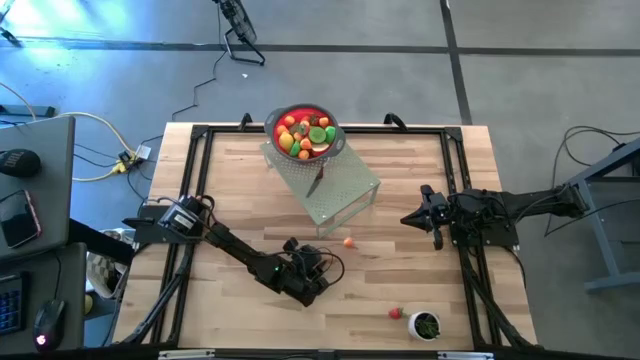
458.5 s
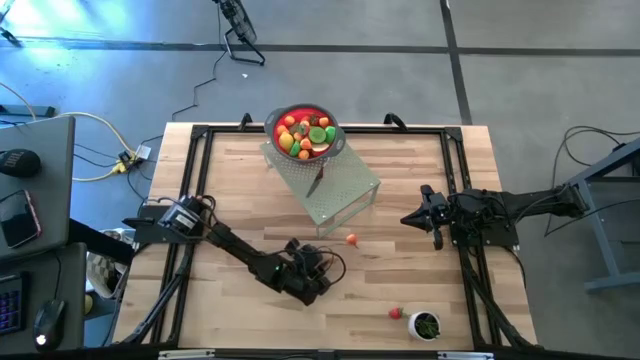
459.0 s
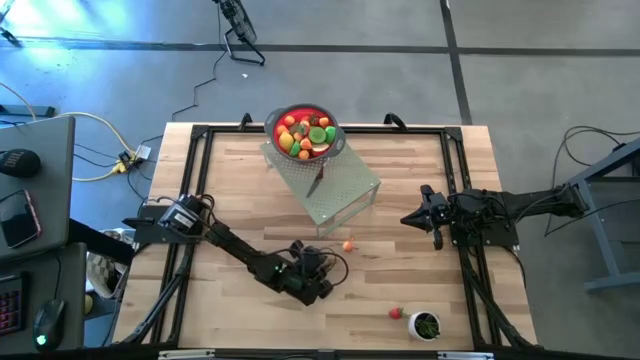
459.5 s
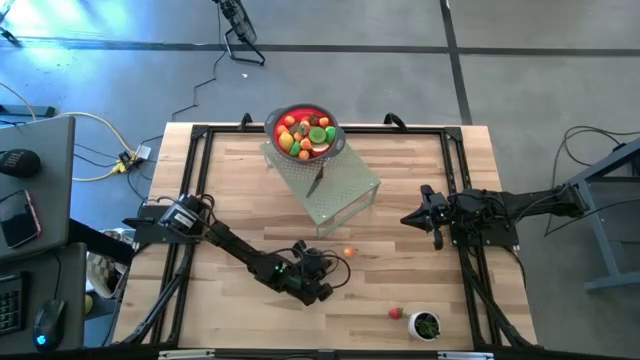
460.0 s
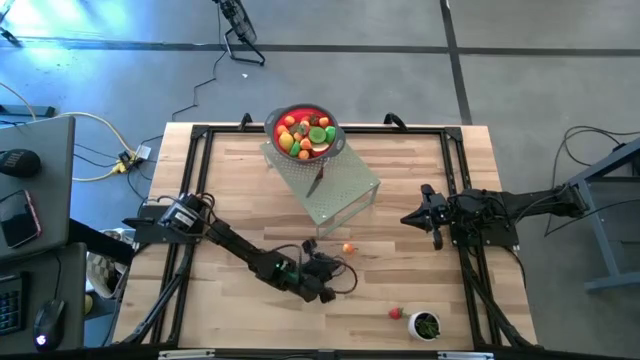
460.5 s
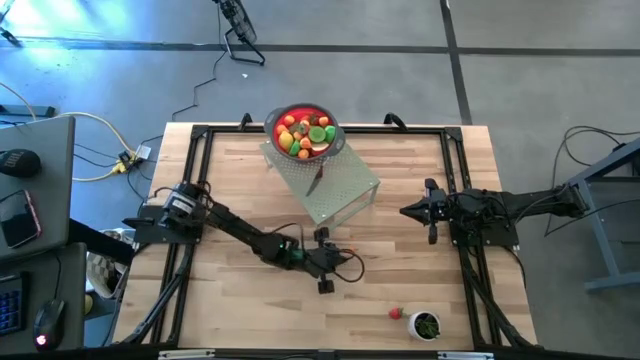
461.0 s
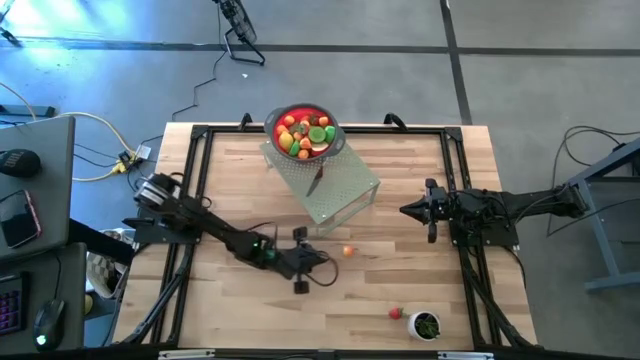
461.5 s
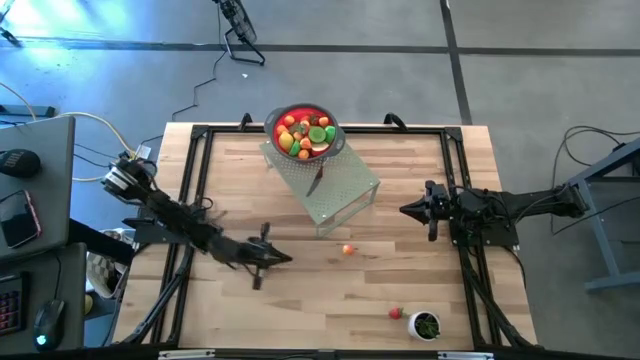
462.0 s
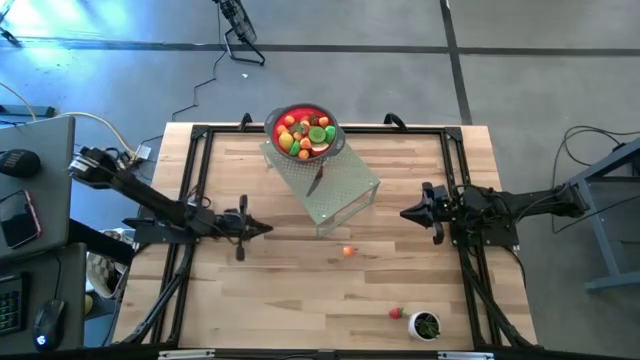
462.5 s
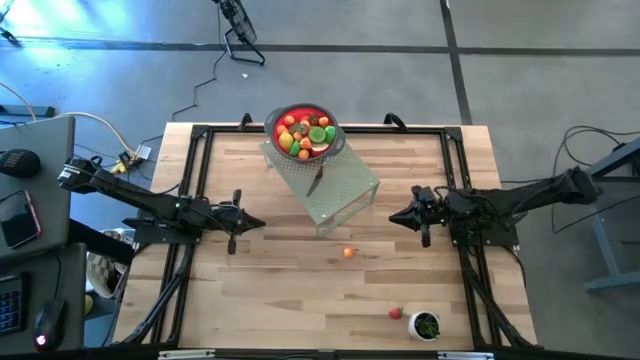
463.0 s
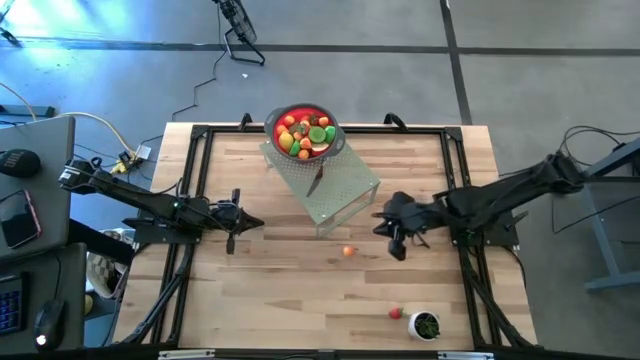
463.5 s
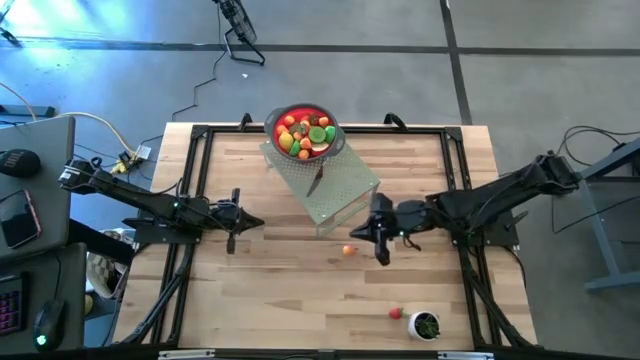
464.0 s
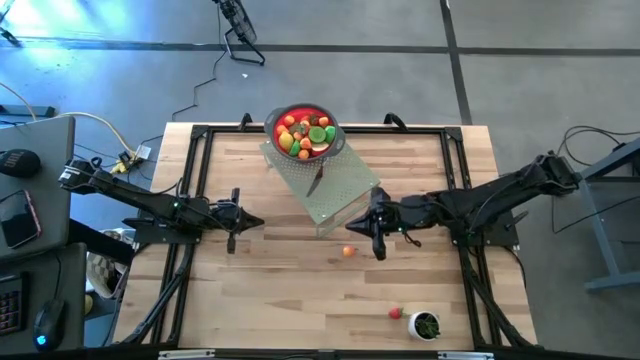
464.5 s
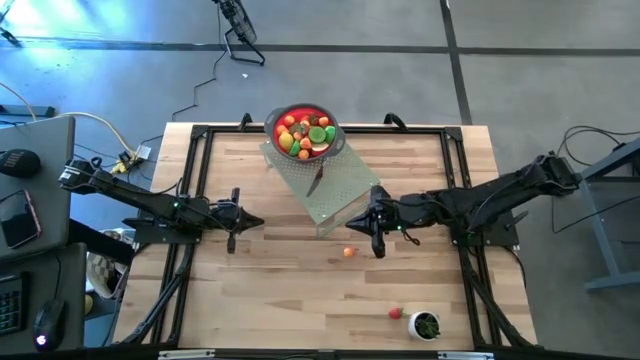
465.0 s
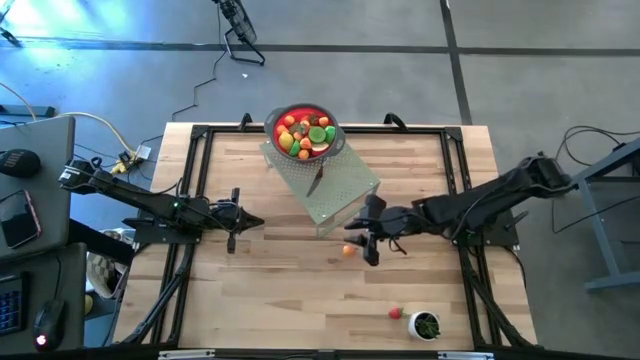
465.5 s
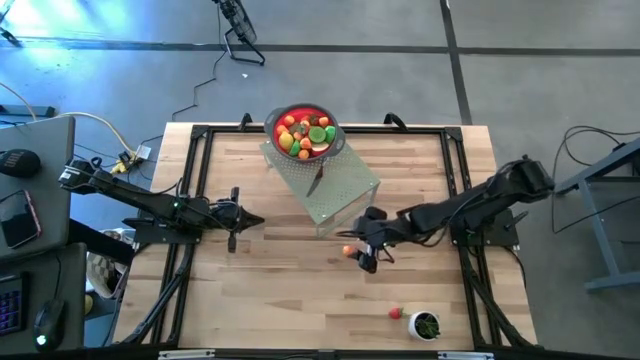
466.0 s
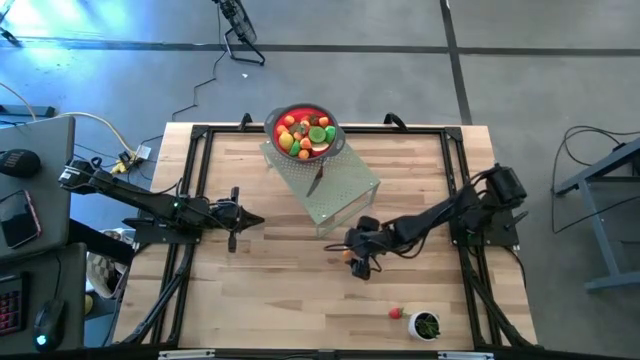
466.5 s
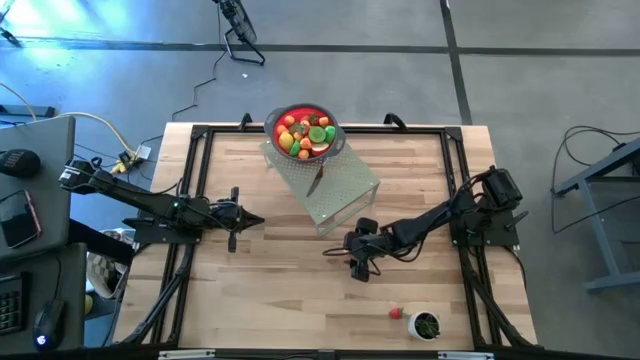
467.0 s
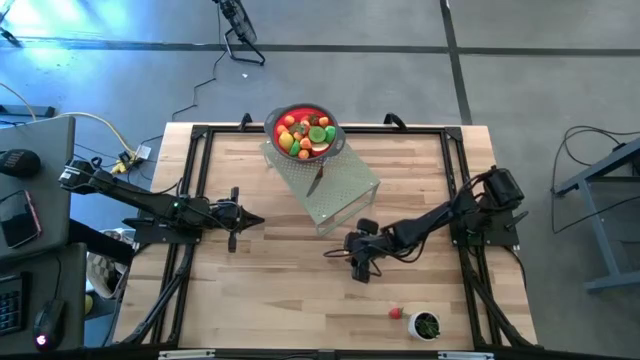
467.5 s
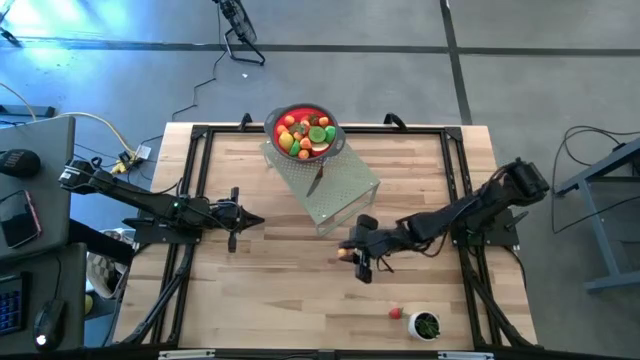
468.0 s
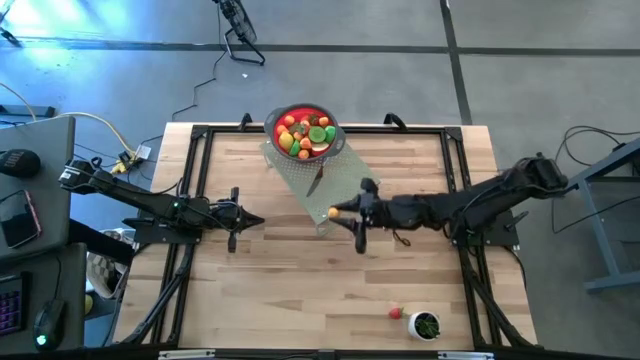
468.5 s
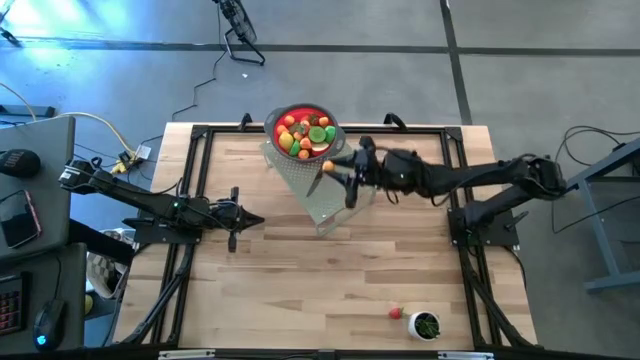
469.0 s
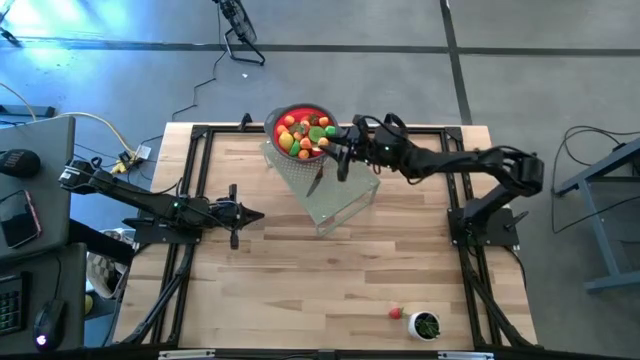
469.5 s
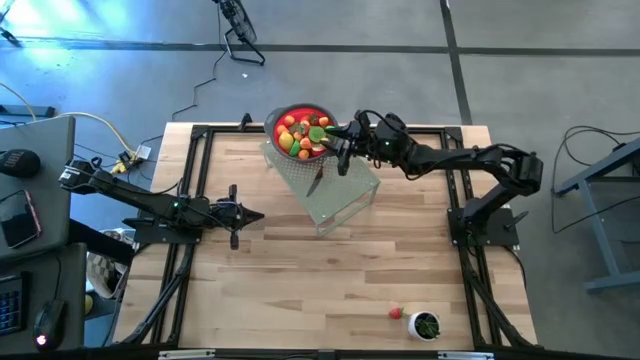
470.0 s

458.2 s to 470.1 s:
Task: Pick & Place Fruit
Put the orange pear into the red strainer on the shelf

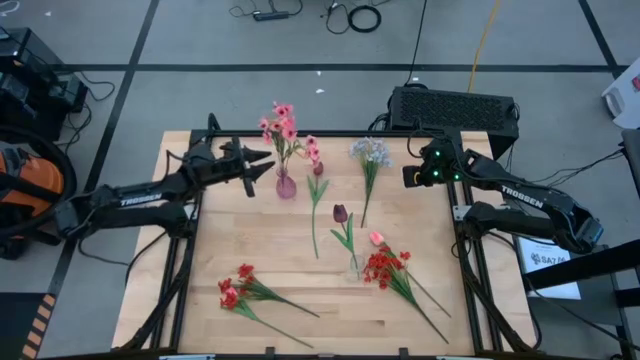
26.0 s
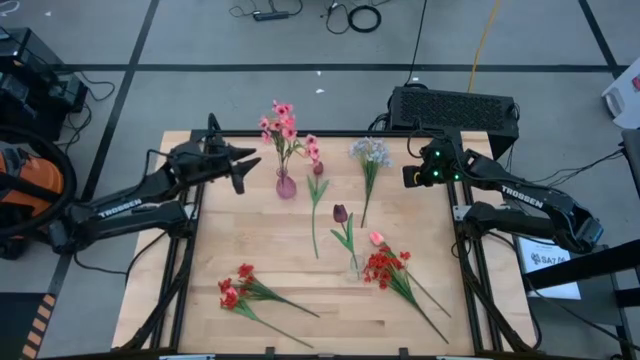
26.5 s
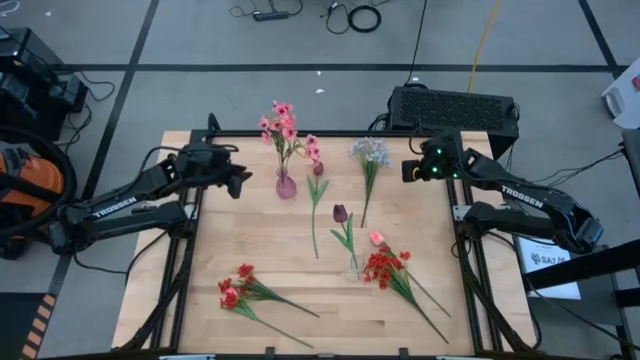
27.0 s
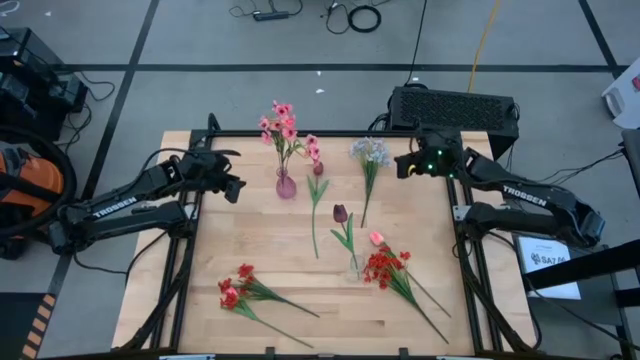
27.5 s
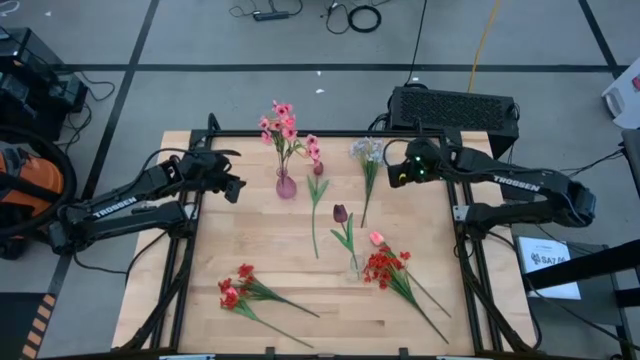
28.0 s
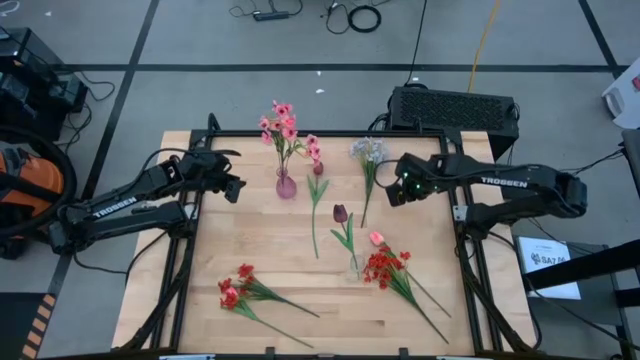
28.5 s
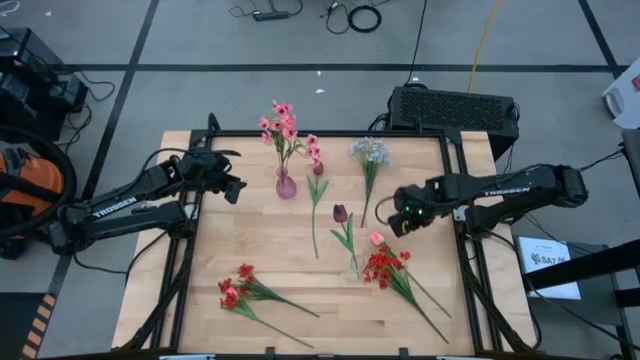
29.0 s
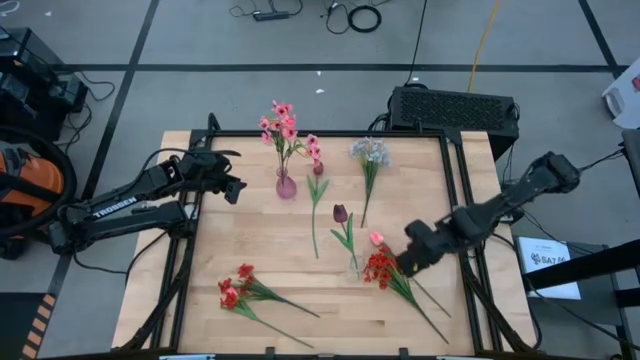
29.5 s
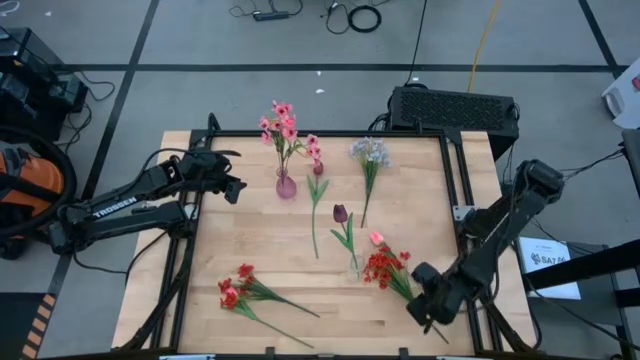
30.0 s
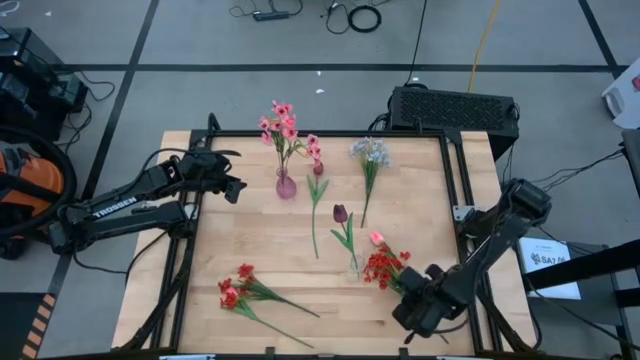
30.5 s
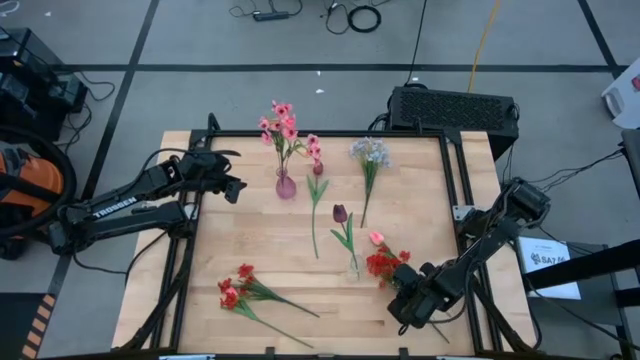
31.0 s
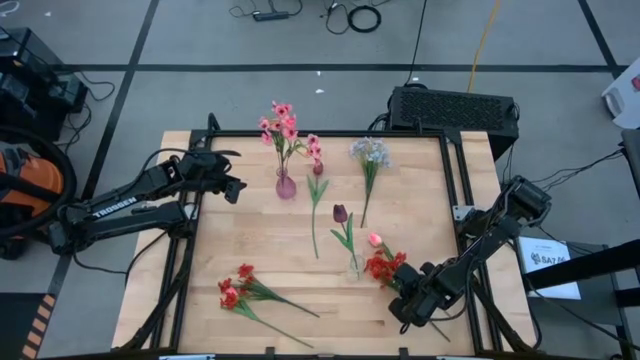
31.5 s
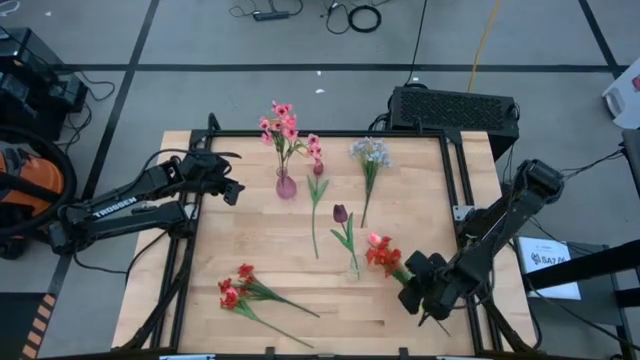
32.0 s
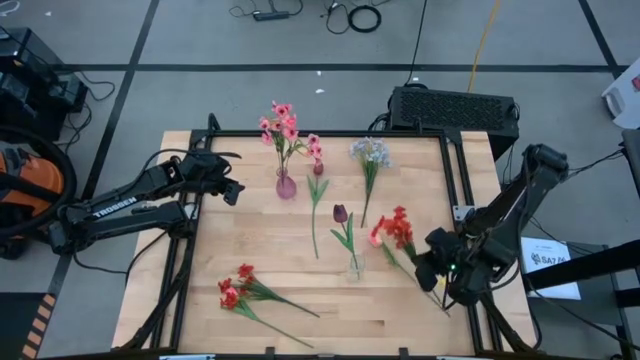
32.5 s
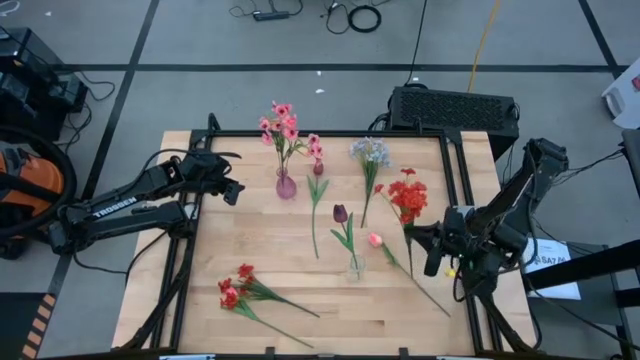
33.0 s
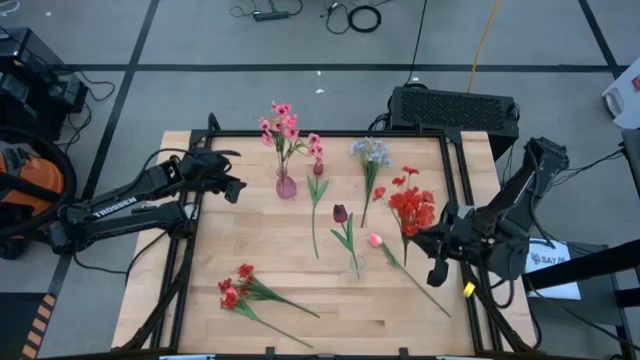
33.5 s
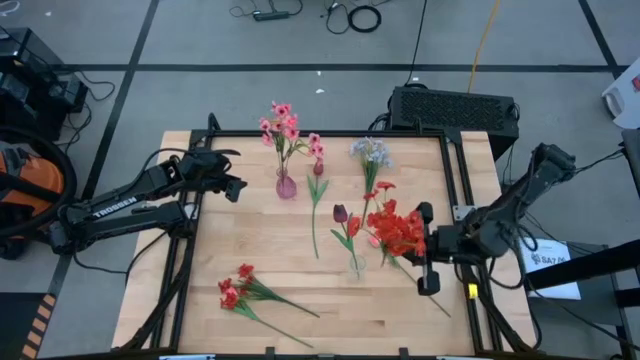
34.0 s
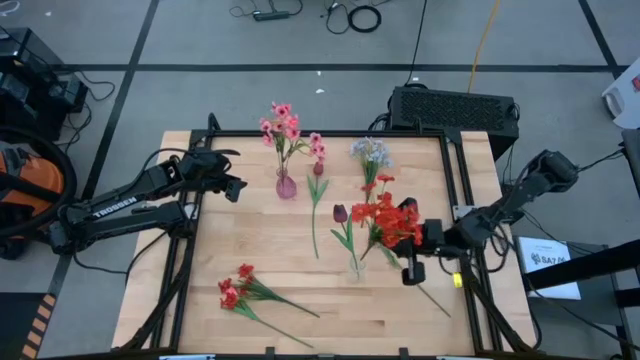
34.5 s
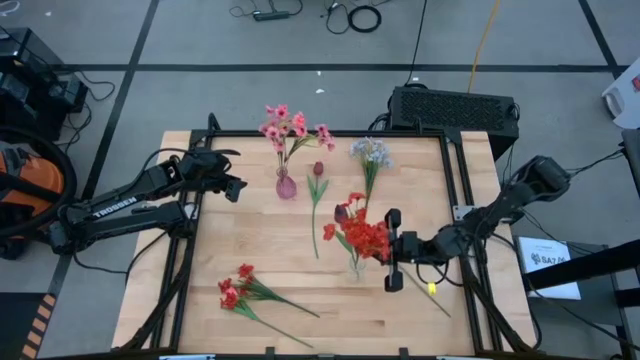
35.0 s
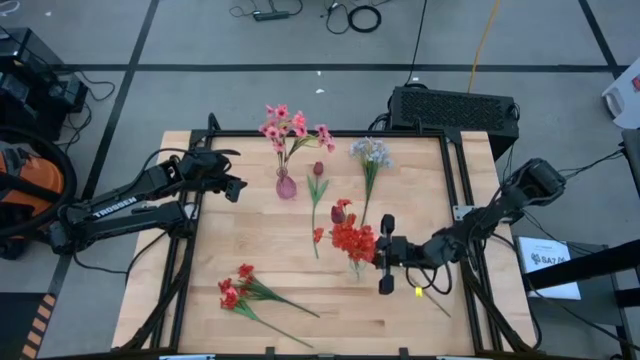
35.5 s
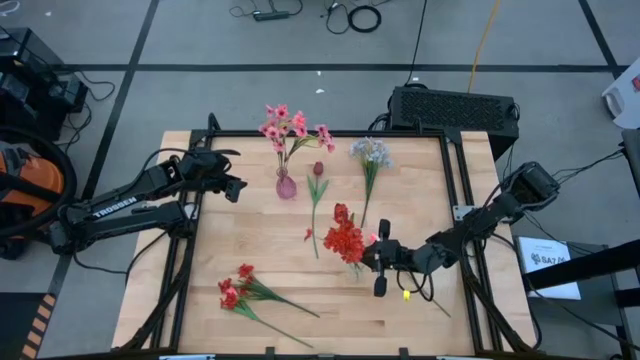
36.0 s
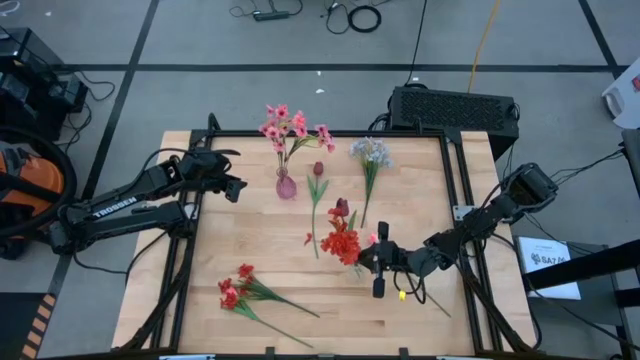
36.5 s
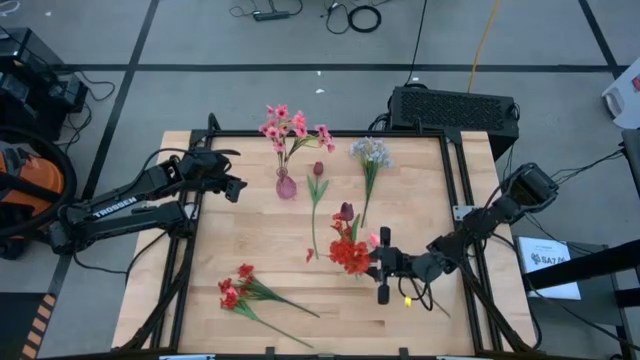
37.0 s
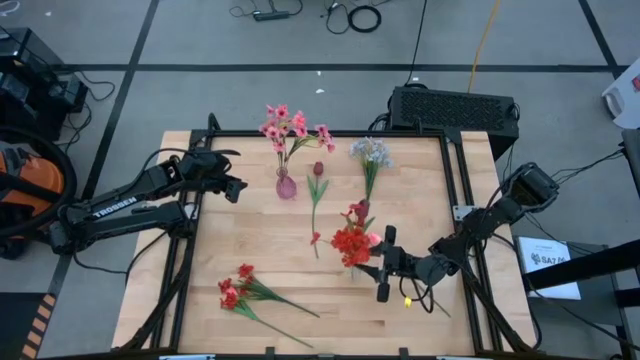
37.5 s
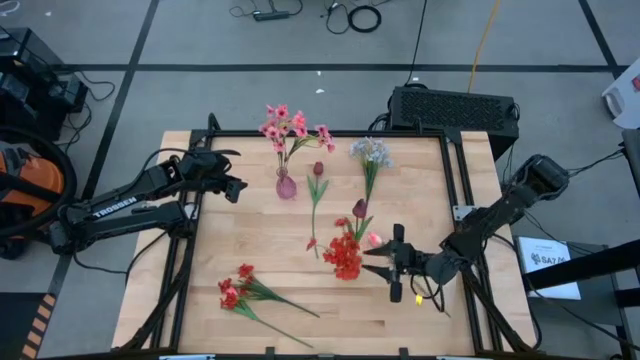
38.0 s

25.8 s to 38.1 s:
Task: Sort flowers into vase by color
Put the right red flowers into the transparent flower vase
